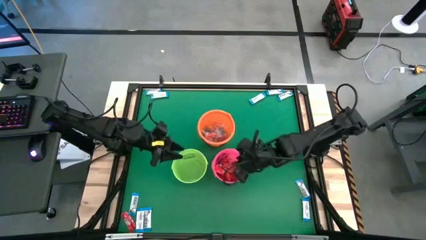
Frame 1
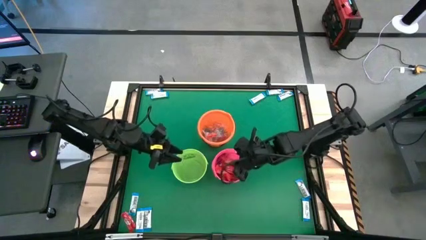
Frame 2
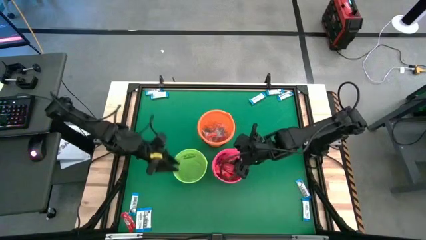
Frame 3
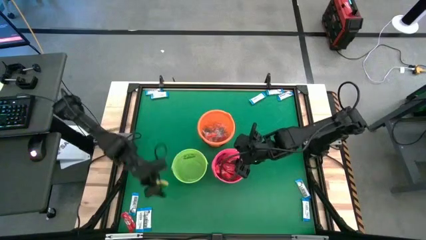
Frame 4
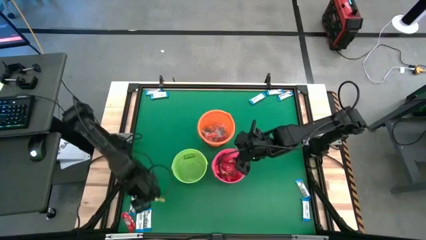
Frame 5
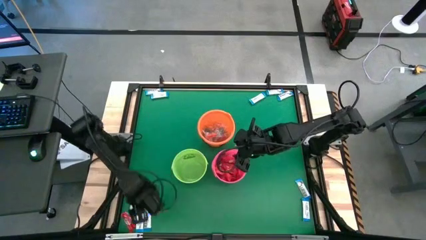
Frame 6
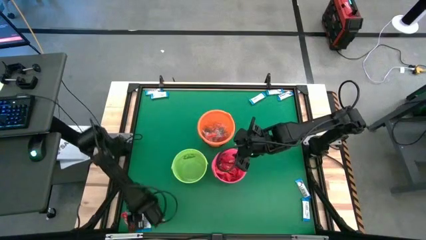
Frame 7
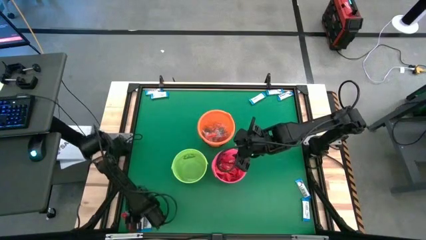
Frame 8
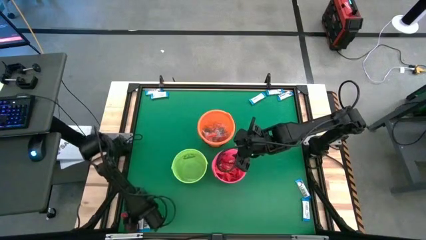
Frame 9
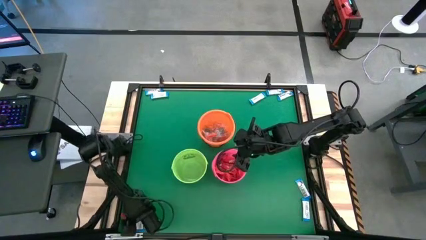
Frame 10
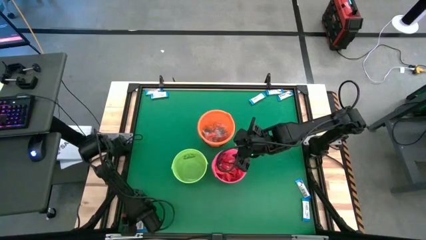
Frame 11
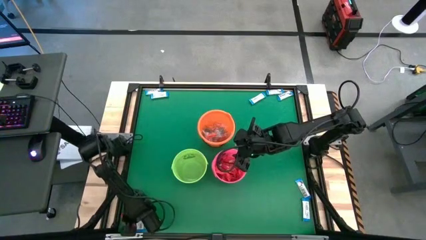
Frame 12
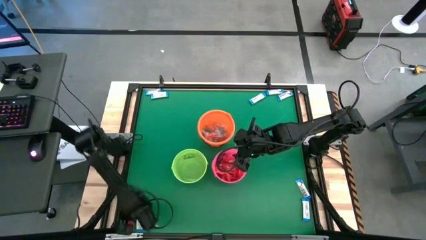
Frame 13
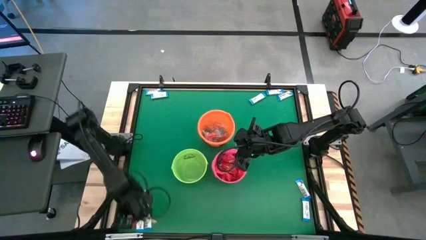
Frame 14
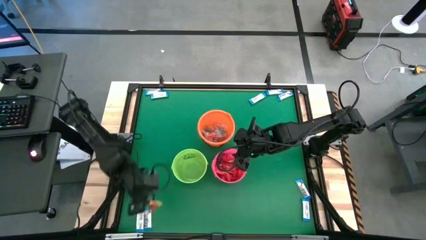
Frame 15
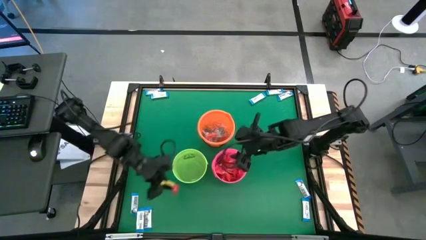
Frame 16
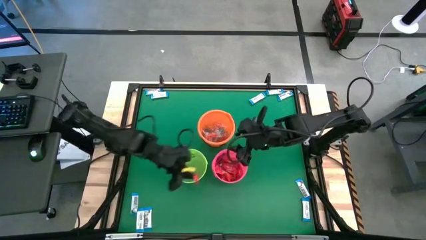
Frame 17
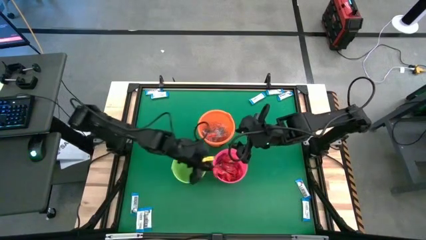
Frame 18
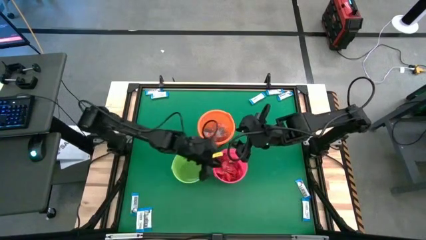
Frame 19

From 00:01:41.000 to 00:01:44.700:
Task: Sort candy by brand, put in halloween buckets
Put the red chocolate bar into the pink bucket

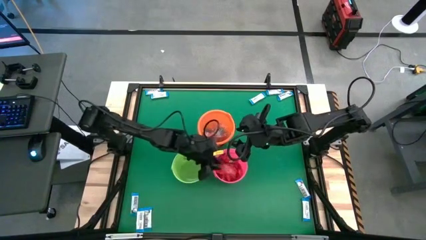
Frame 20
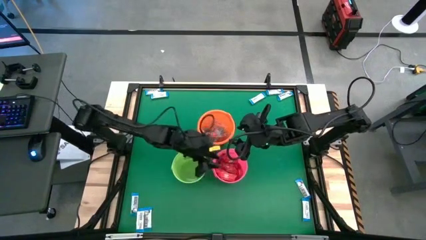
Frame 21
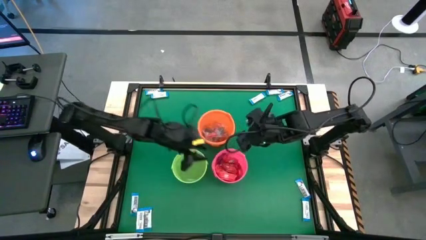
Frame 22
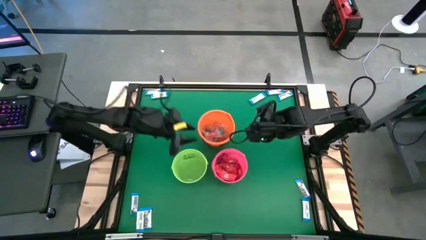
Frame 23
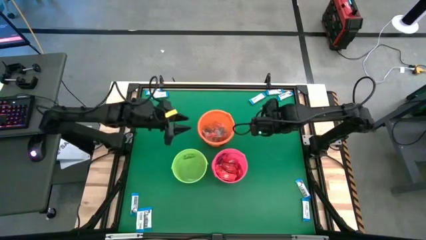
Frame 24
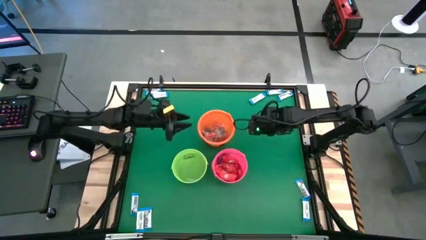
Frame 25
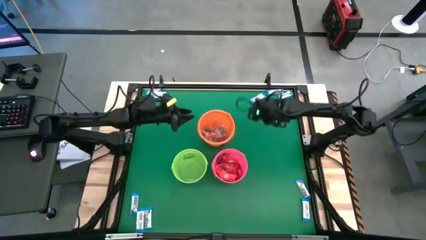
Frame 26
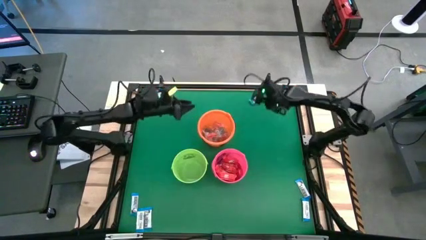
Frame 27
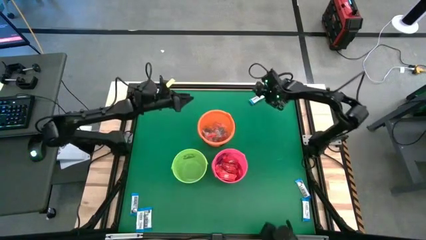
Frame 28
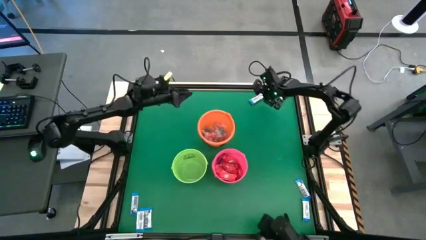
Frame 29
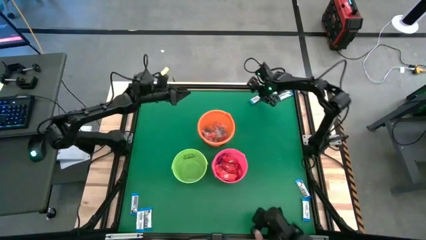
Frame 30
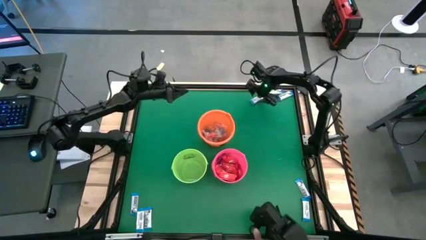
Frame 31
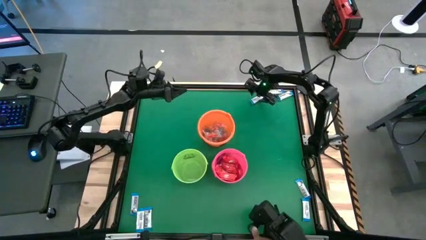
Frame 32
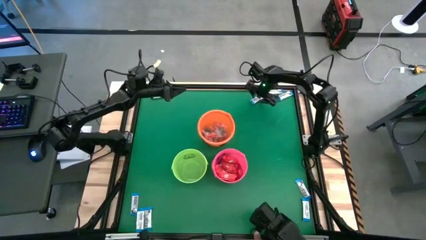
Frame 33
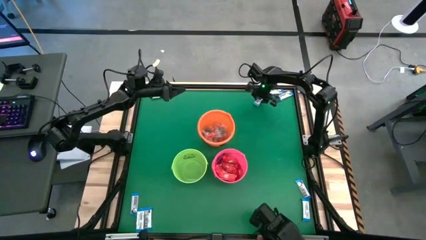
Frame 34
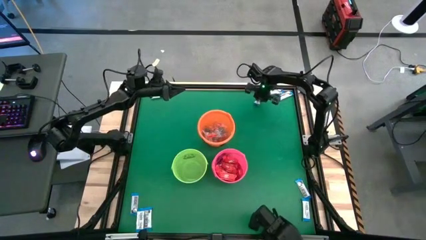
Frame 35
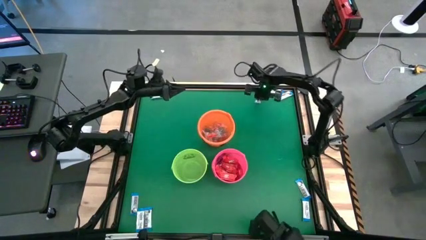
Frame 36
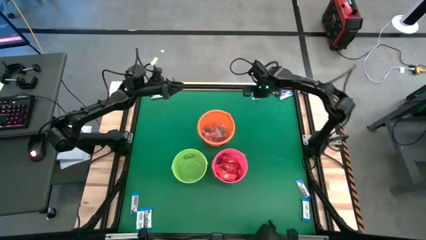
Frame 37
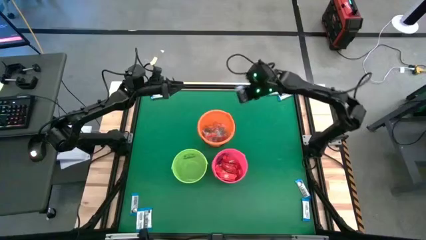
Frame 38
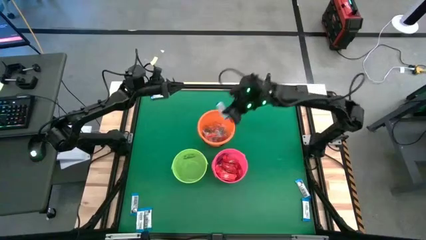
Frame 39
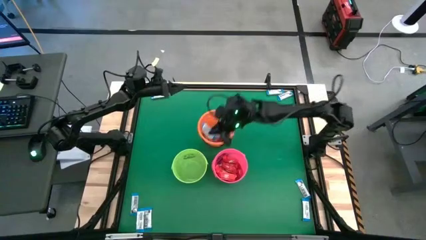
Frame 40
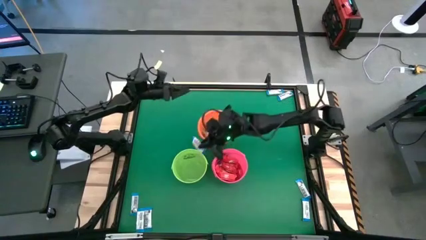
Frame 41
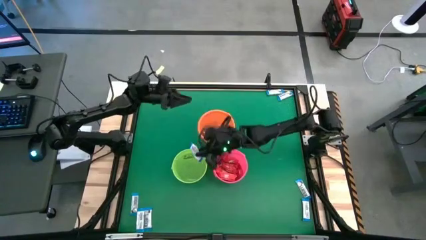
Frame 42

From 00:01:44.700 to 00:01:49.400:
Put the white chocolate bar into the green bucket

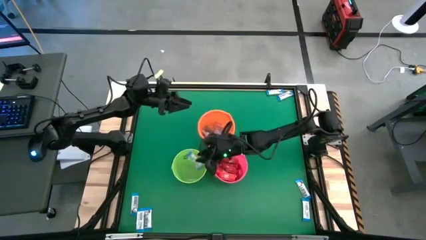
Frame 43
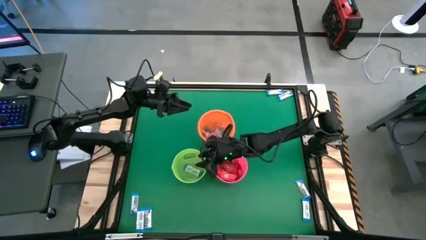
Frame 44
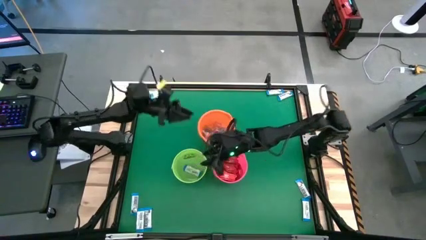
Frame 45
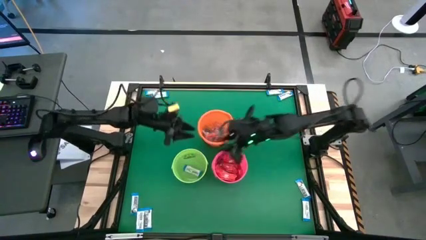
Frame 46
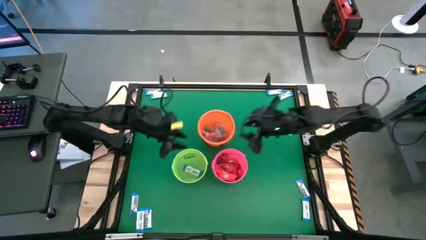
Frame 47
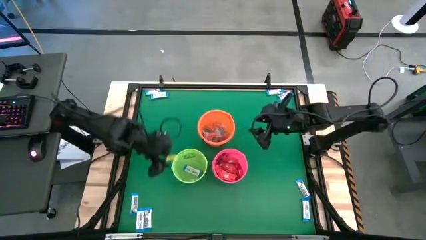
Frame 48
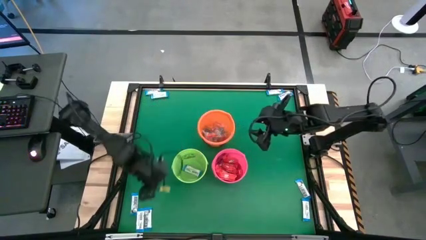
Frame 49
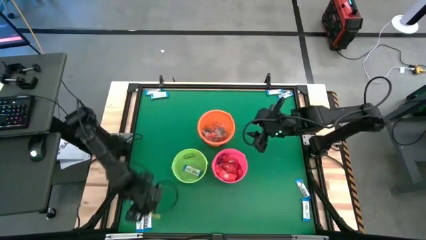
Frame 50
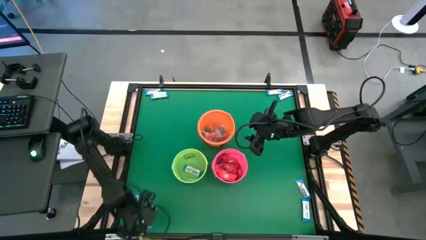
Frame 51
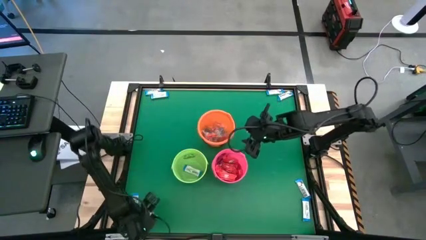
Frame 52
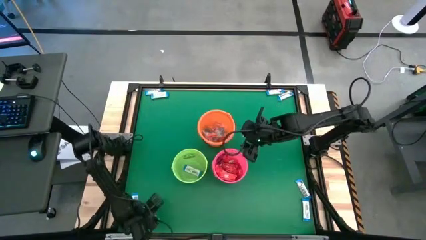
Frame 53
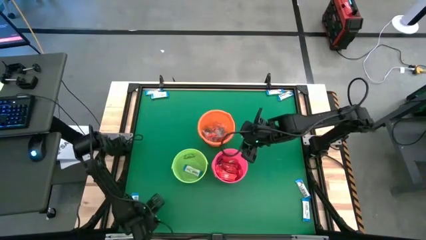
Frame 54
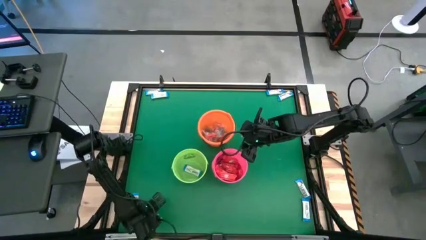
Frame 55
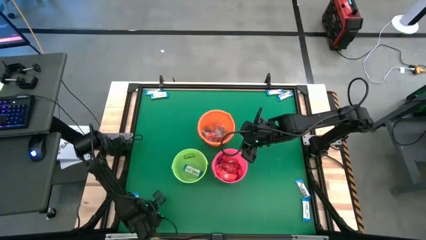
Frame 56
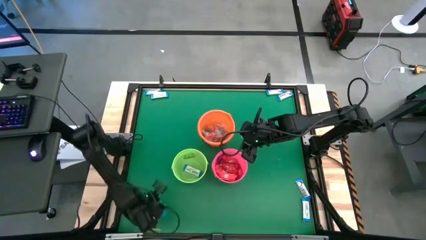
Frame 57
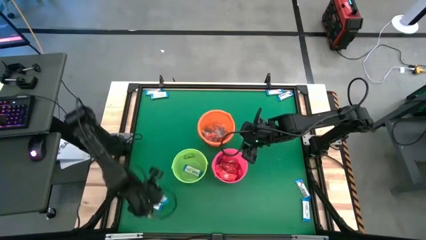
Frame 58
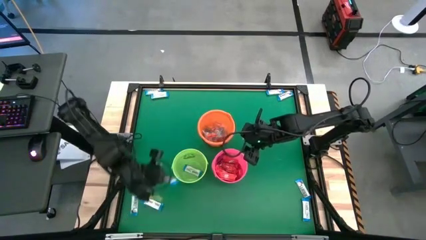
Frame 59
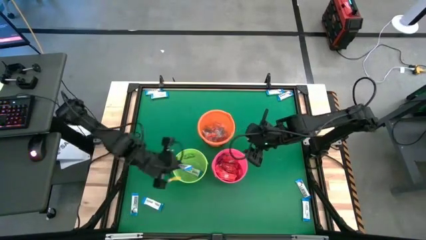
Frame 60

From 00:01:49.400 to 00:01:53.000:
Put the white chocolate bar into the green bucket

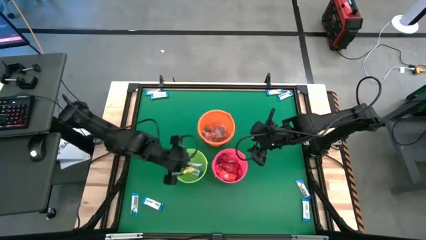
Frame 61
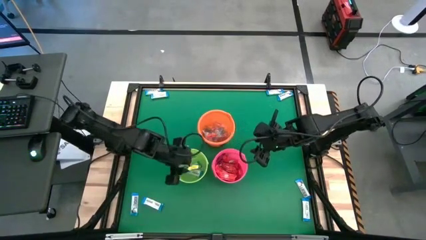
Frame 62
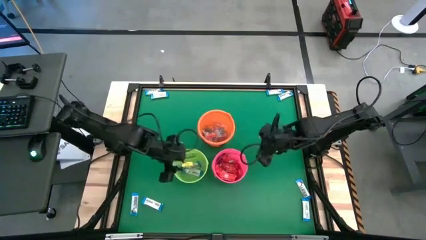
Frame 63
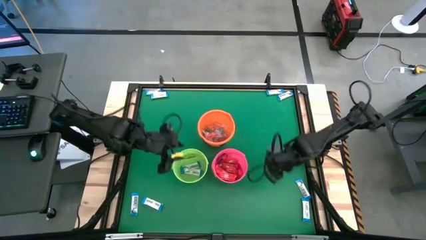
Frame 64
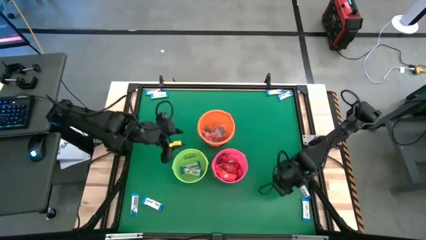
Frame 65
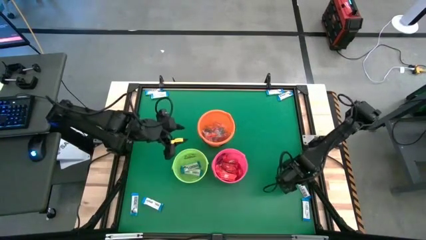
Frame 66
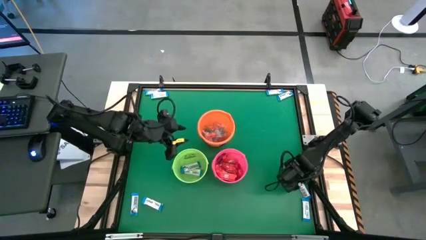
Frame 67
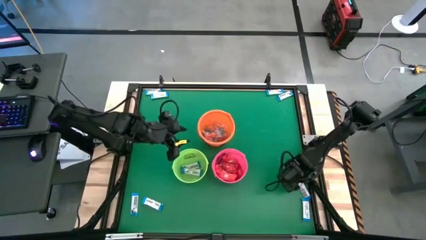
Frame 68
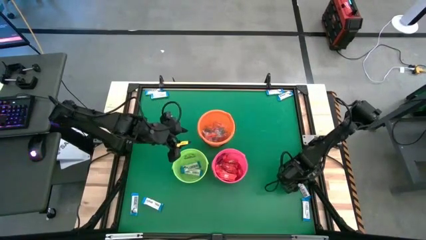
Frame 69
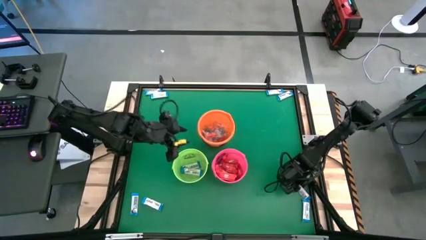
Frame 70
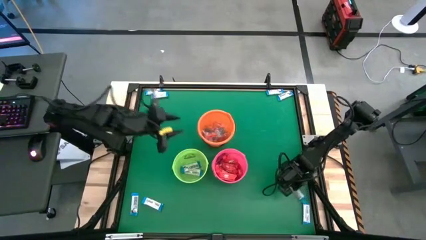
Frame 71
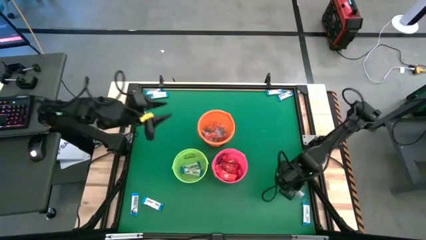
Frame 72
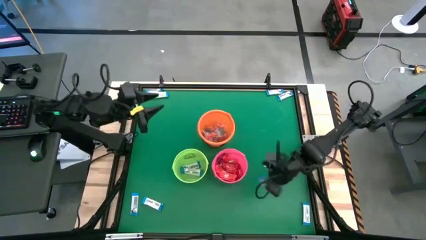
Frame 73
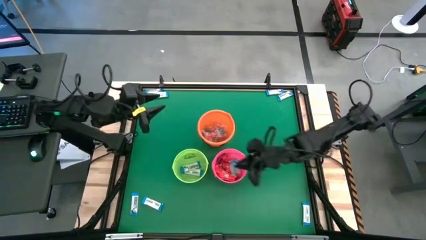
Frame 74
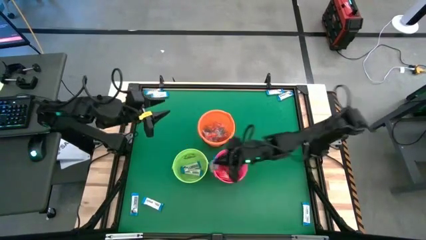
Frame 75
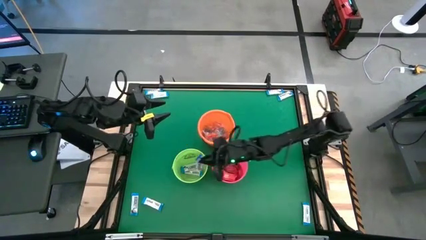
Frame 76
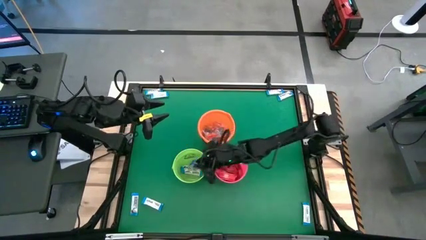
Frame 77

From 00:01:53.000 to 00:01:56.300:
Put the white chocolate bar into the green bucket

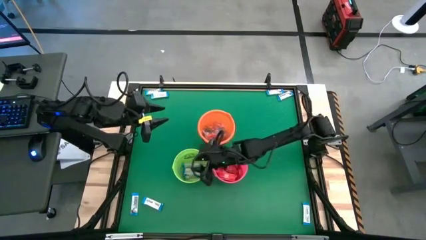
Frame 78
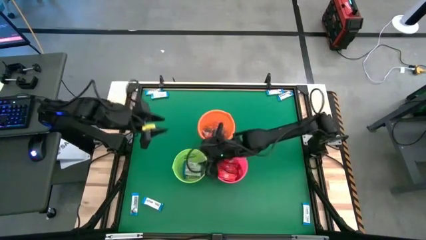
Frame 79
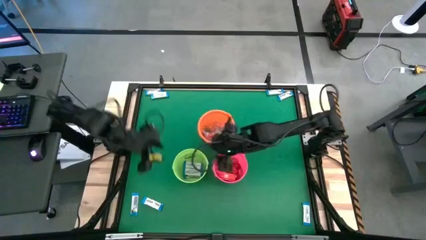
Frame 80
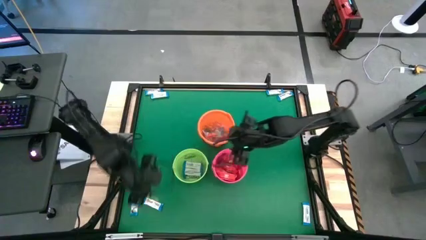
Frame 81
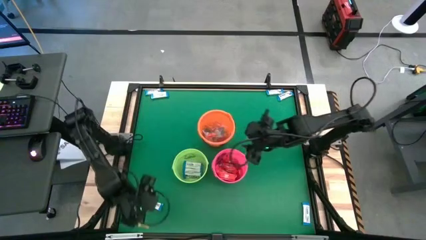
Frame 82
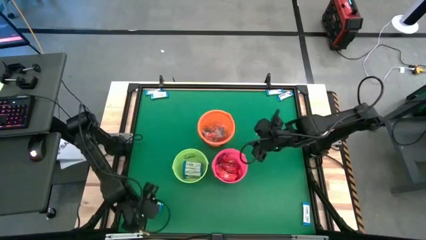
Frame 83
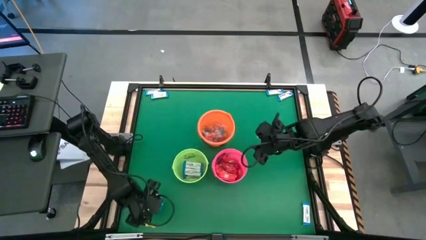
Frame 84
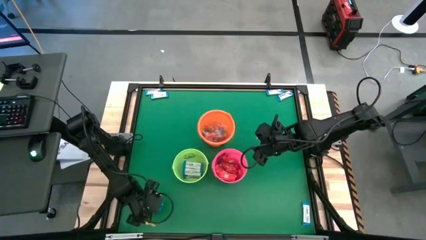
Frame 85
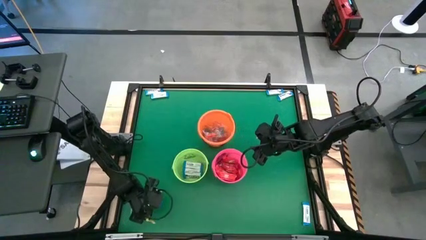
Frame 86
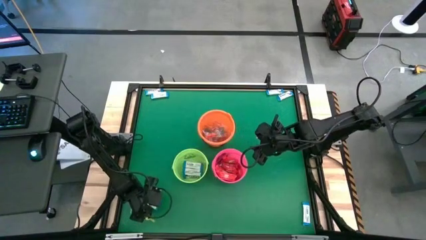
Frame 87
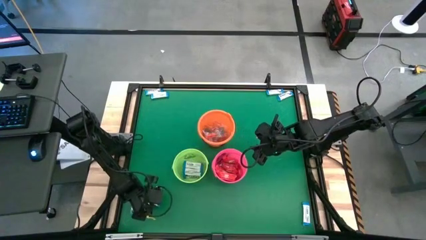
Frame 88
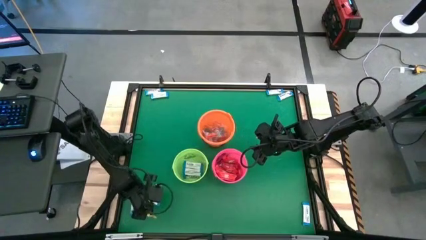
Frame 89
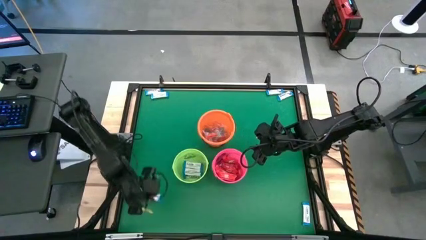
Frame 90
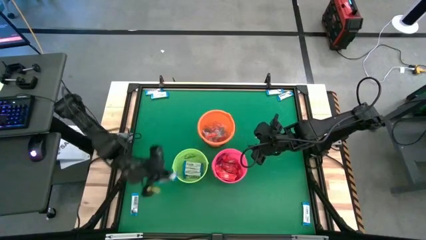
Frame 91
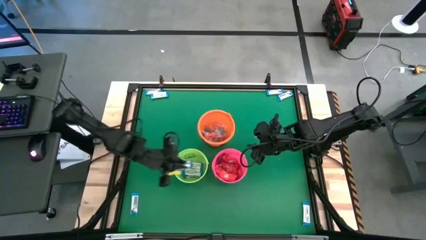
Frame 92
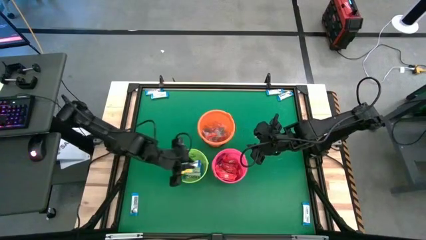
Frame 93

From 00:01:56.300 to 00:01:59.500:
Put the white chocolate bar into the green bucket
